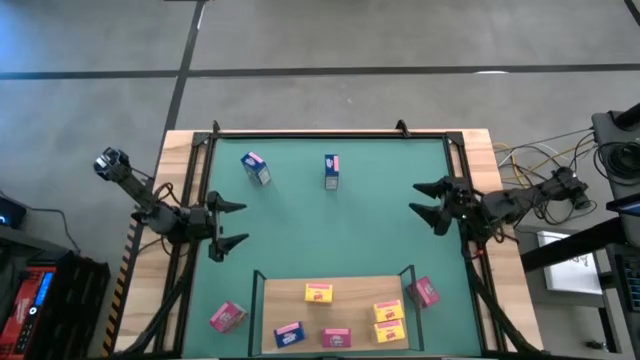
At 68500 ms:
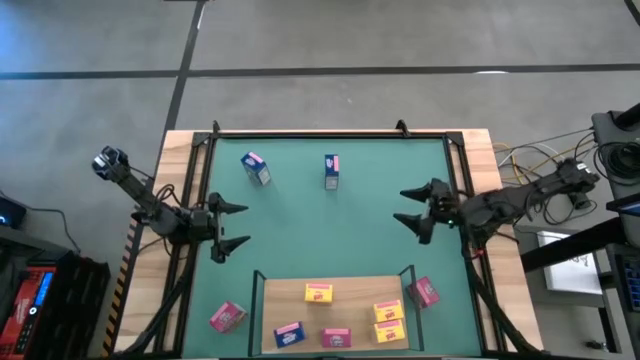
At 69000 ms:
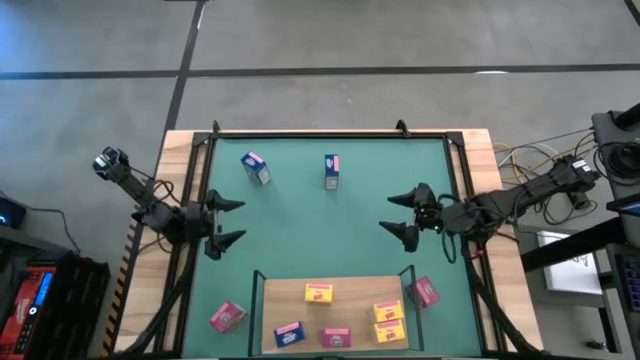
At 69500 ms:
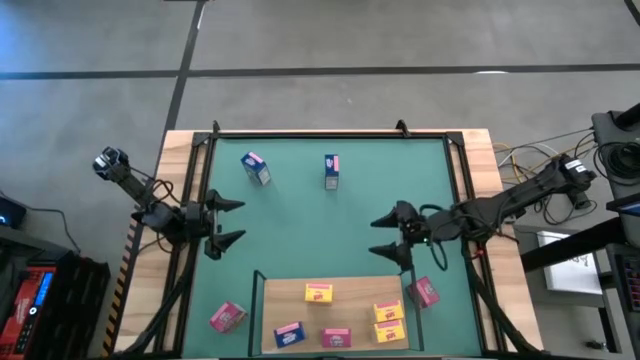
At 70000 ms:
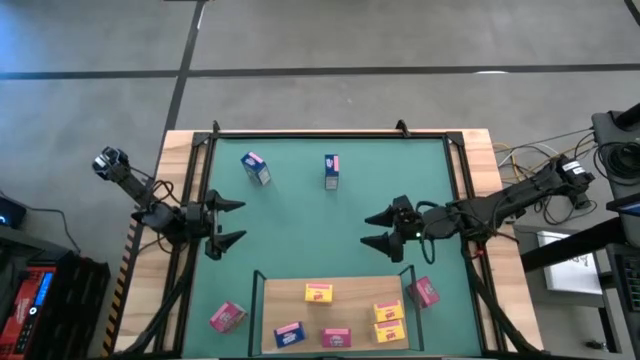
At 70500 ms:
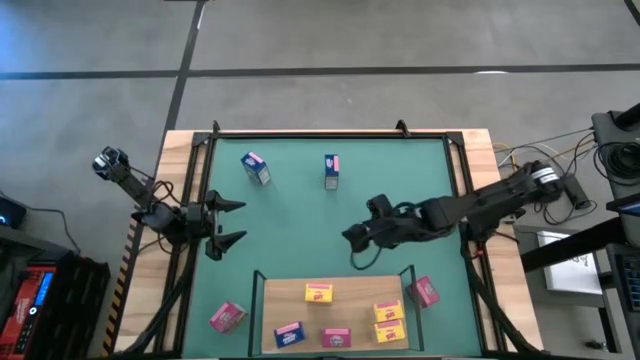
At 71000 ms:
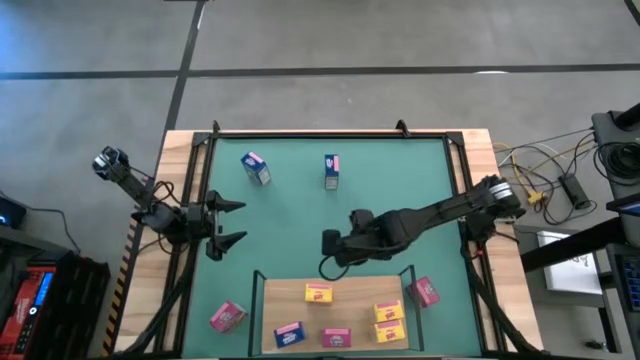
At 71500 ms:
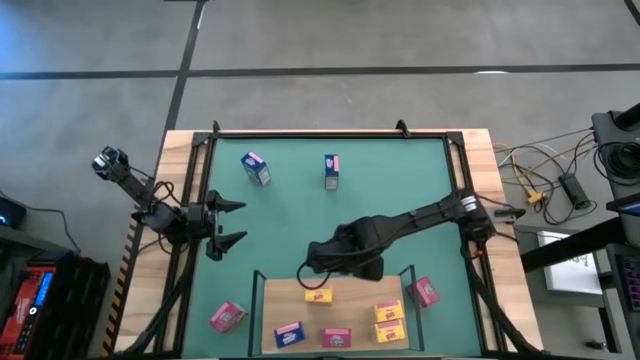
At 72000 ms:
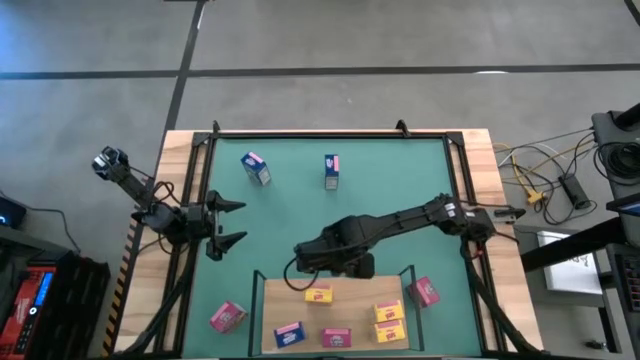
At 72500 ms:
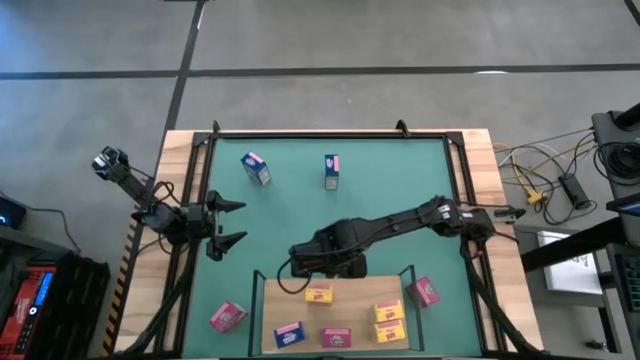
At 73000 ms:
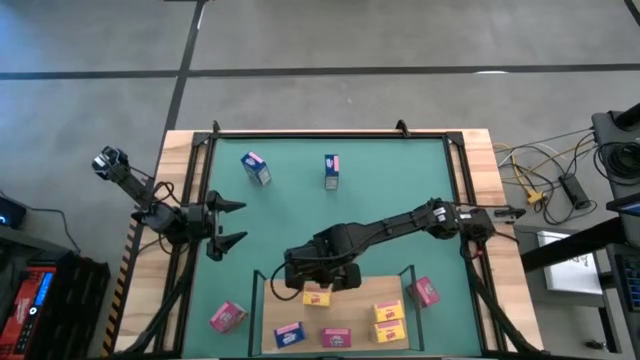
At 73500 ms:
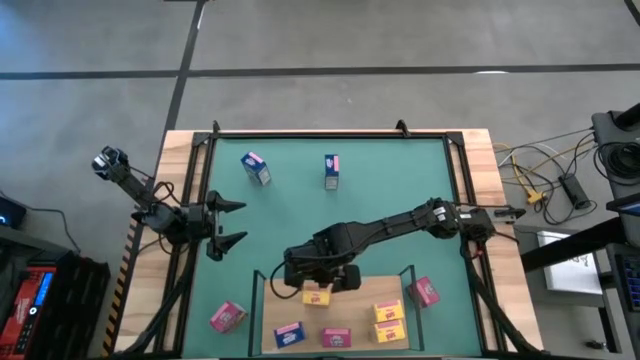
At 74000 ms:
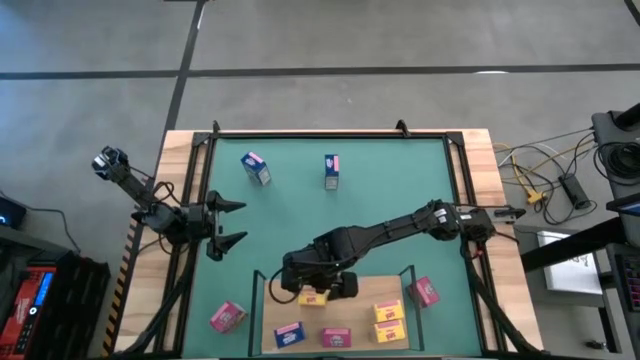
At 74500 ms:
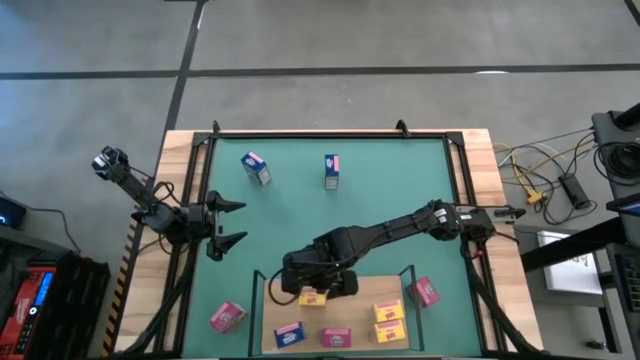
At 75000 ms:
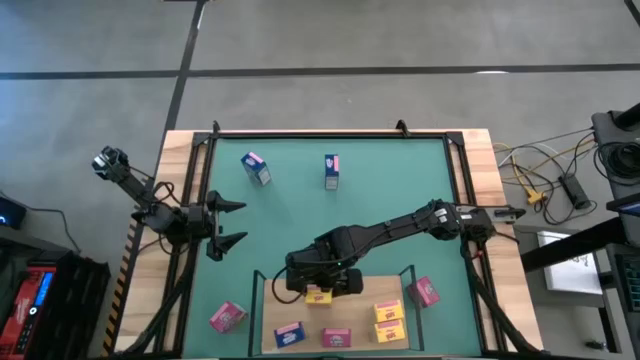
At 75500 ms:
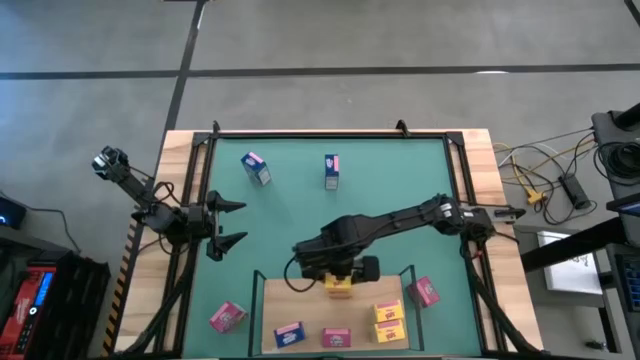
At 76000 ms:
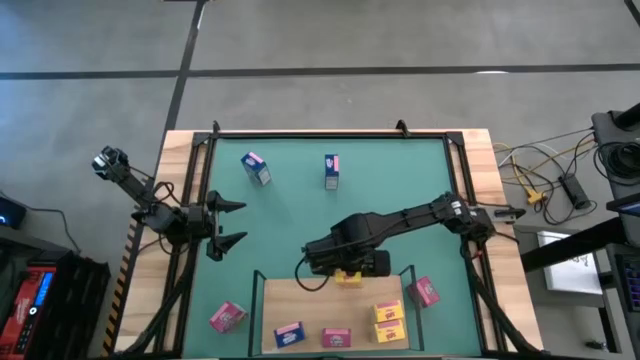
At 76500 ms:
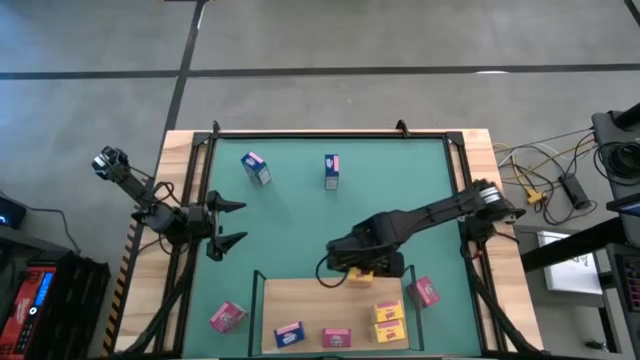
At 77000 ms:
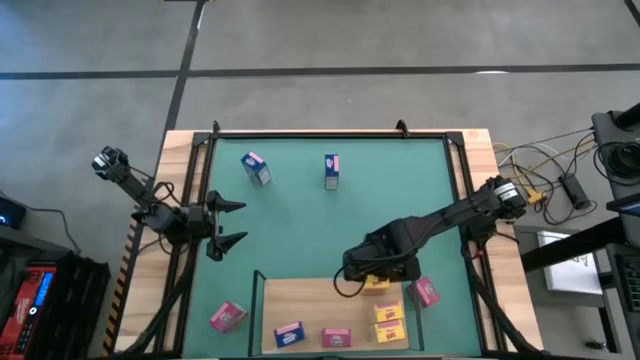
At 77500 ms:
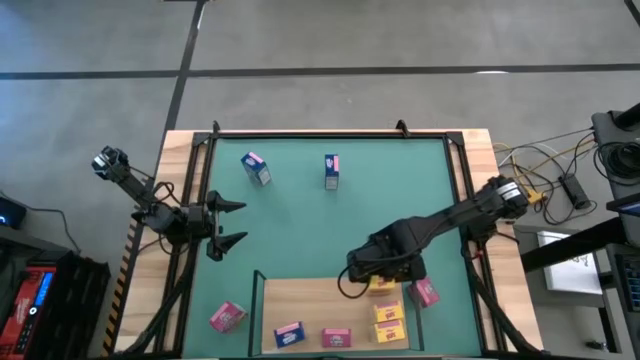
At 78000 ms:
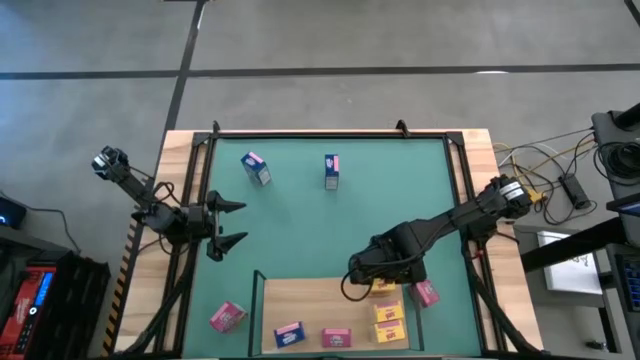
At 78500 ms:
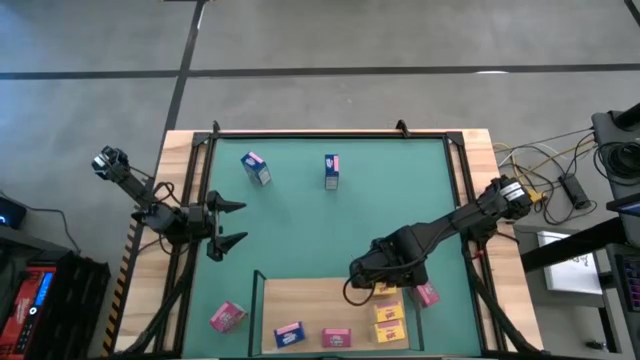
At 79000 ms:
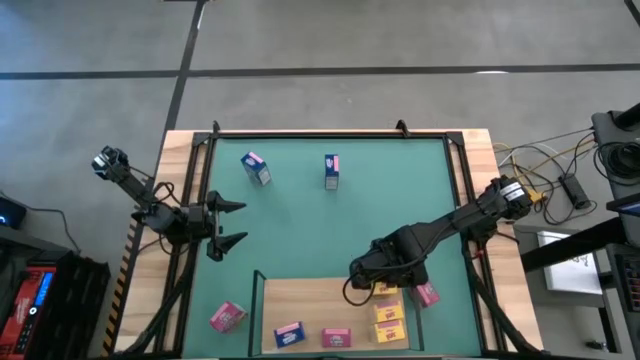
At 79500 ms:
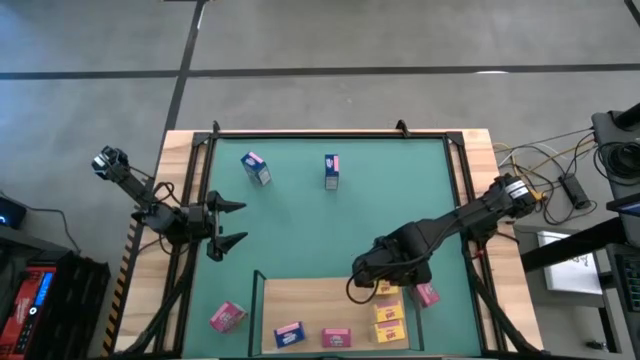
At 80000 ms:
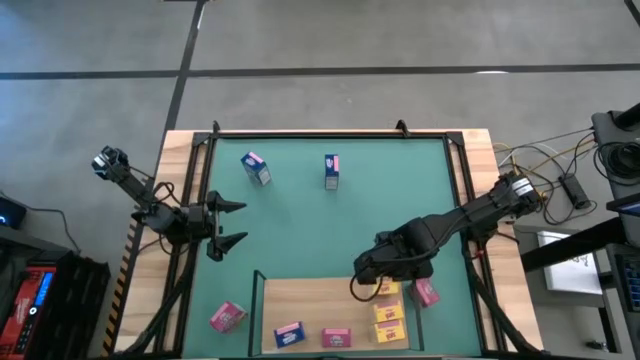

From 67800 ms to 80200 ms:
Task: Stack cereal on shelf
Put the yellow cereal box on the shelf aligned with the other yellow cereal boxes

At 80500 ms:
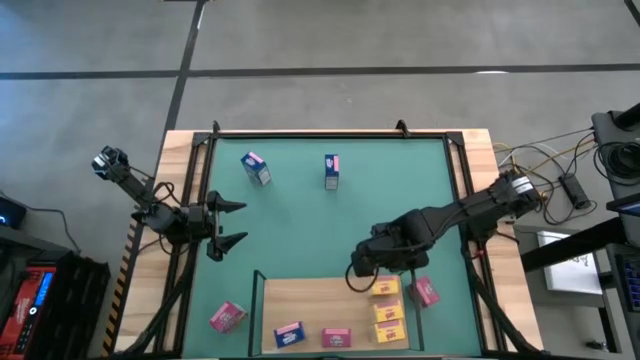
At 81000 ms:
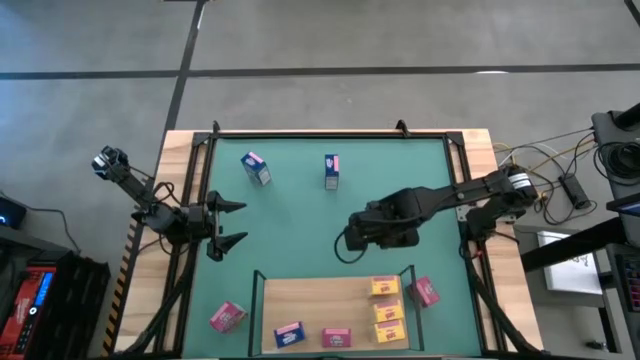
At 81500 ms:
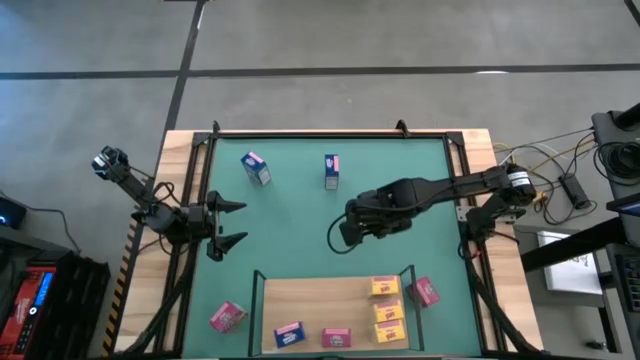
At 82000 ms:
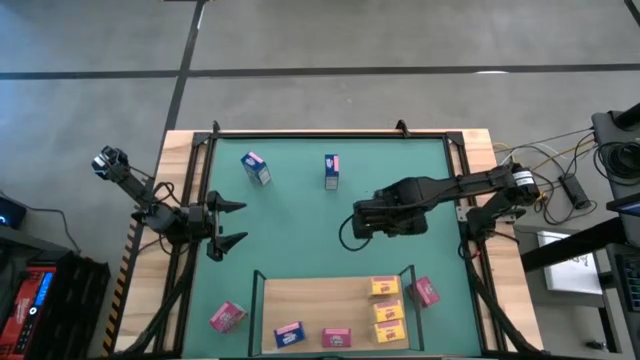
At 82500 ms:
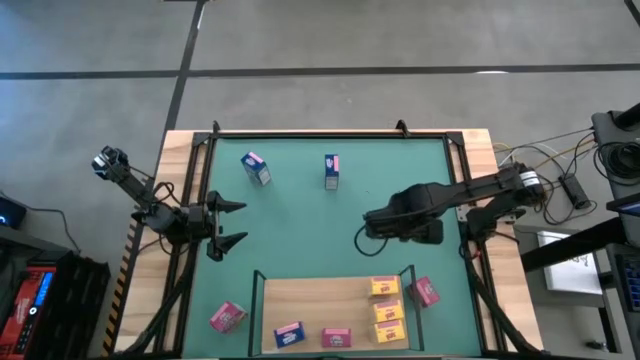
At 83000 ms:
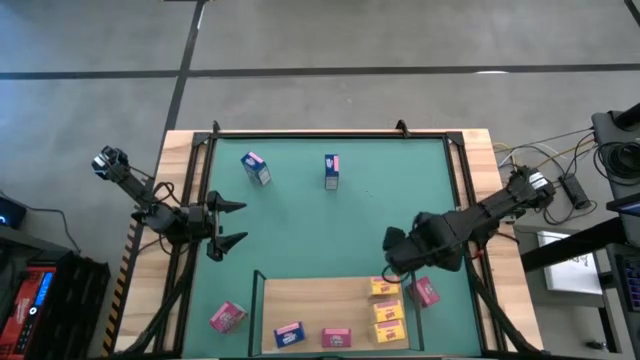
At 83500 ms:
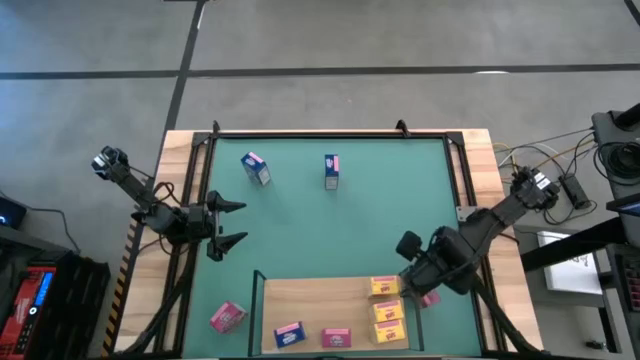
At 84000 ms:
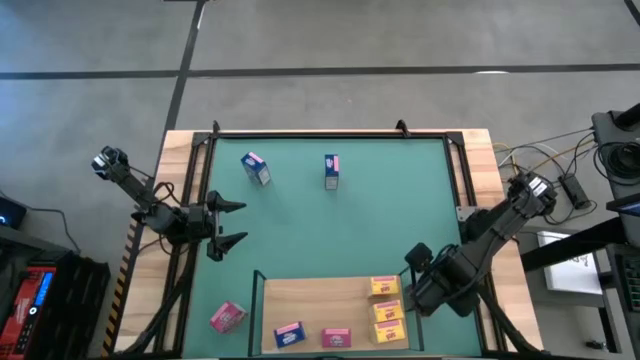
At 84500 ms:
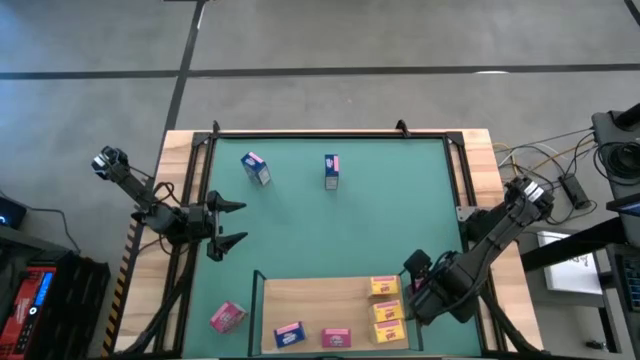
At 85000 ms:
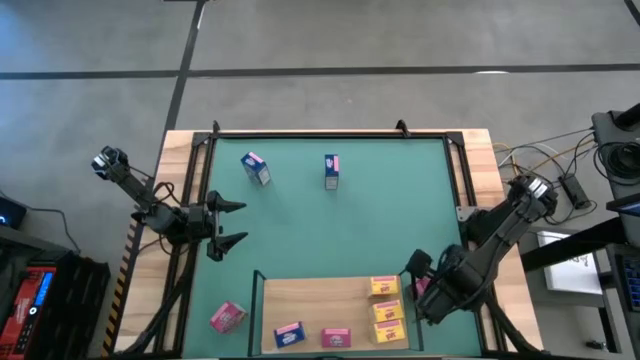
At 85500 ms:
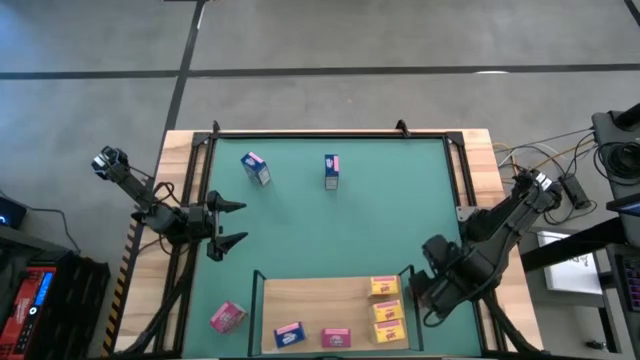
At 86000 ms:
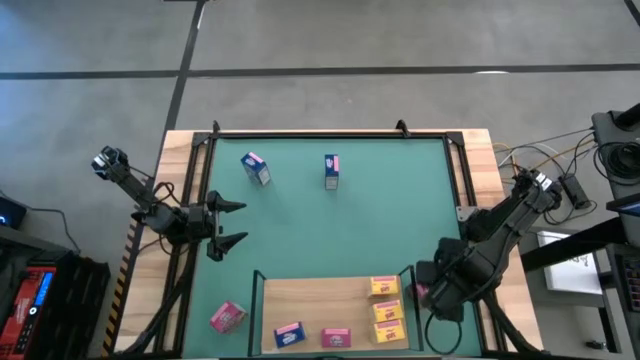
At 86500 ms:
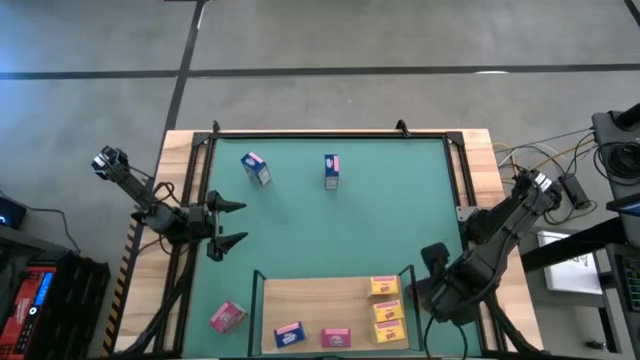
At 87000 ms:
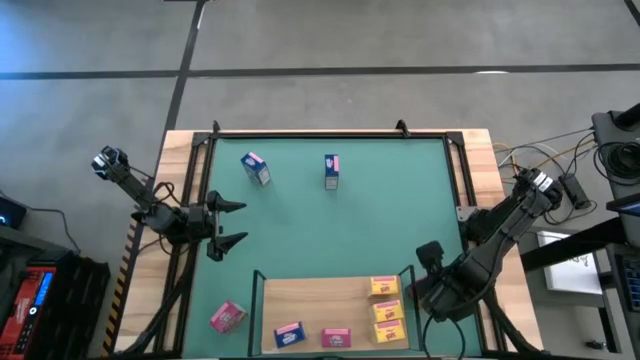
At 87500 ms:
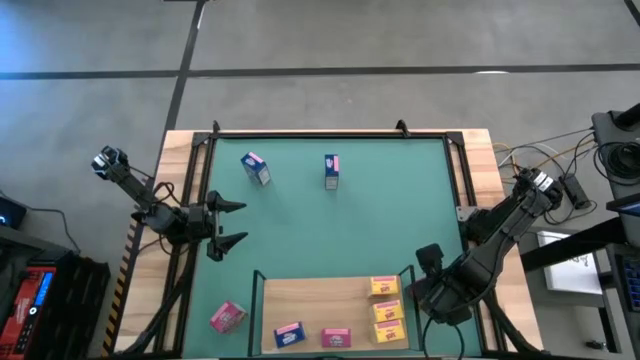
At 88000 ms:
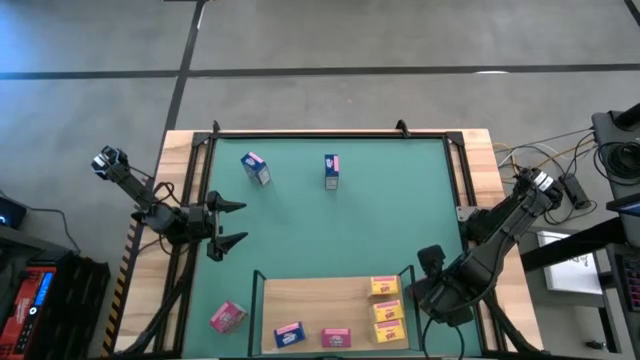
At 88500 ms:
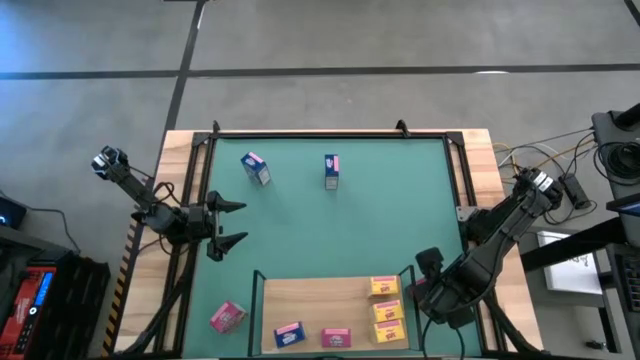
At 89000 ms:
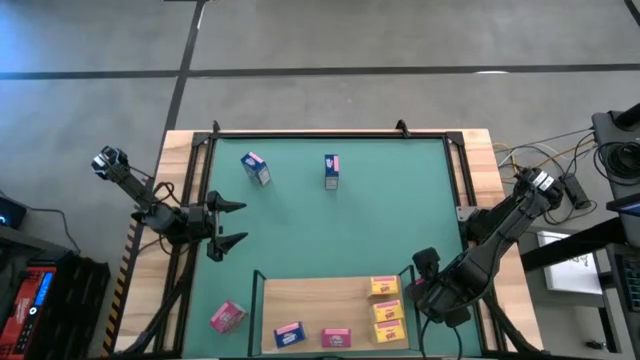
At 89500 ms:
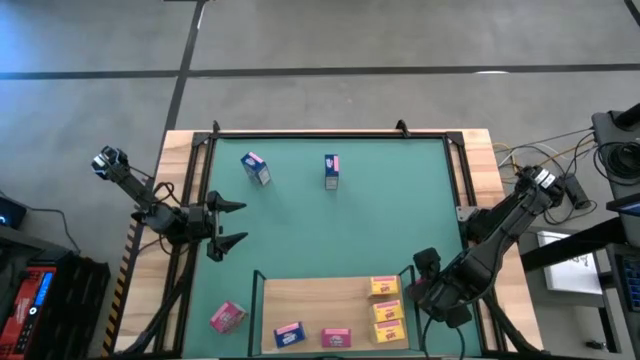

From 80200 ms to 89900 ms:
Put the right violet cereal box on the shelf aligned with the other violet cereal box
